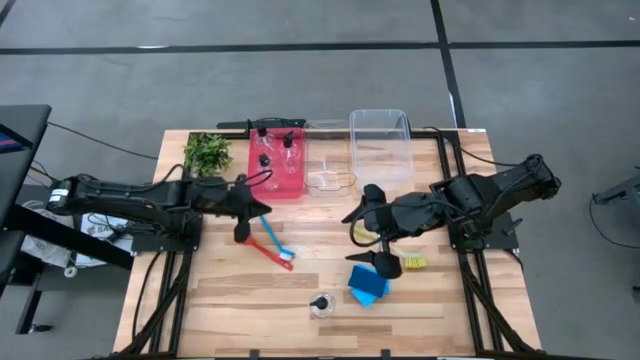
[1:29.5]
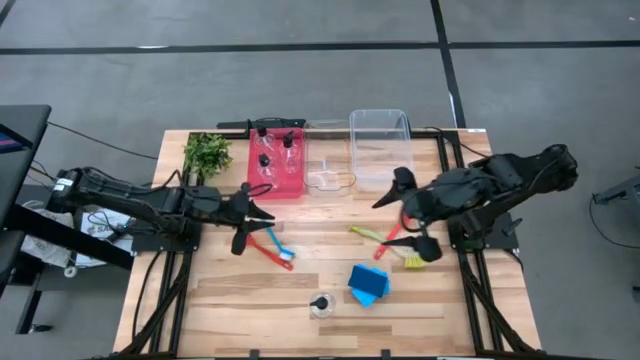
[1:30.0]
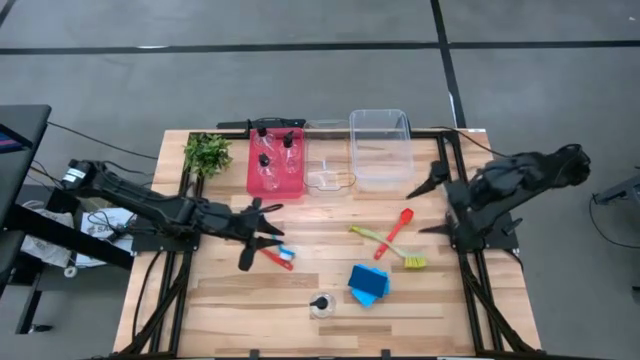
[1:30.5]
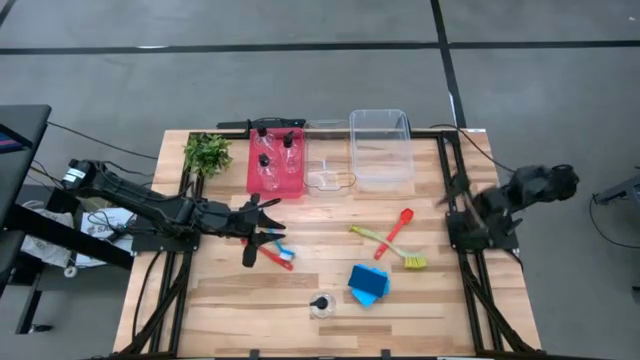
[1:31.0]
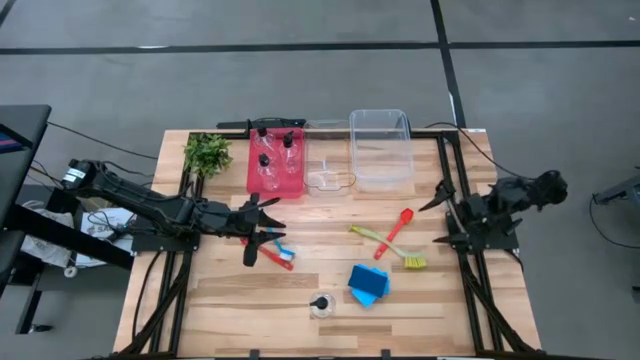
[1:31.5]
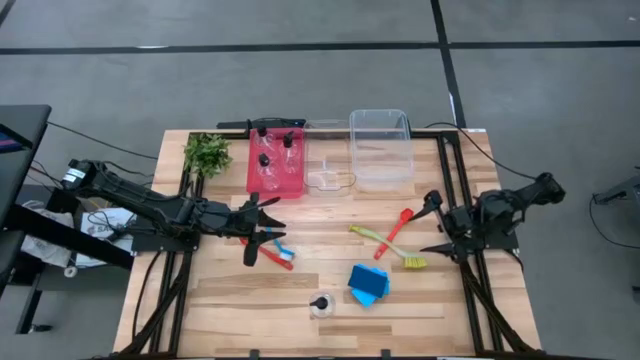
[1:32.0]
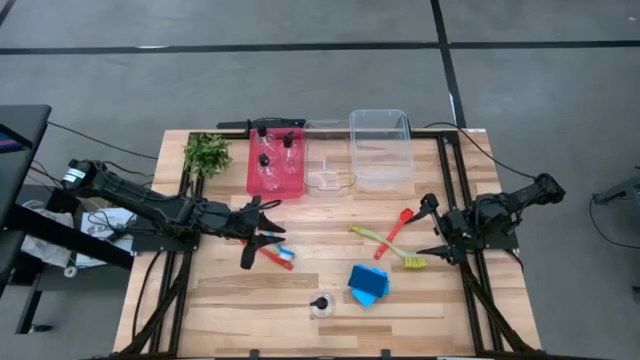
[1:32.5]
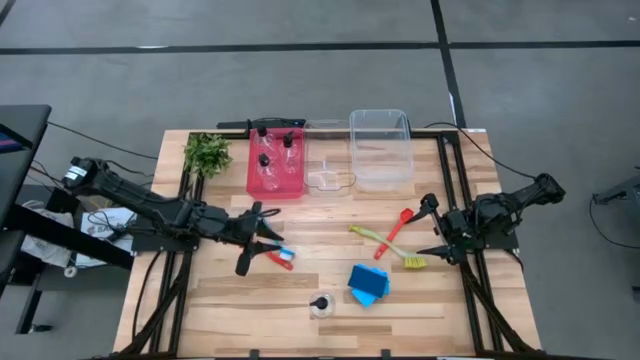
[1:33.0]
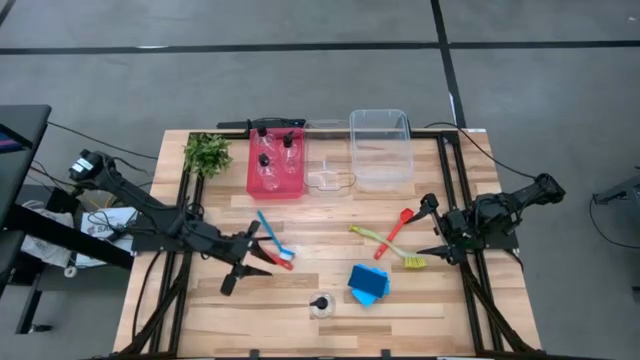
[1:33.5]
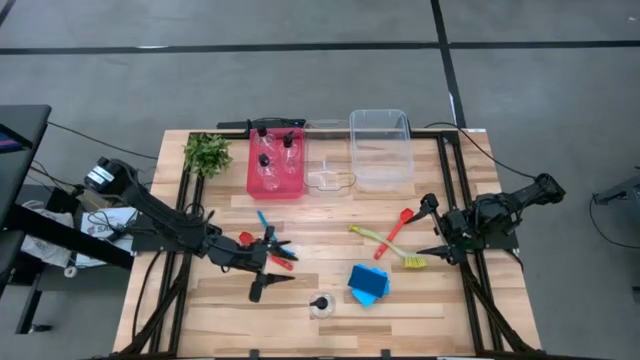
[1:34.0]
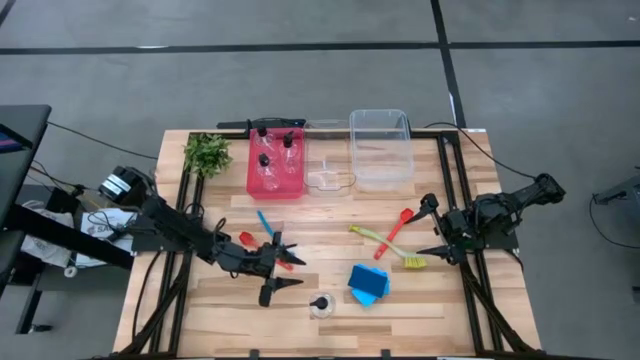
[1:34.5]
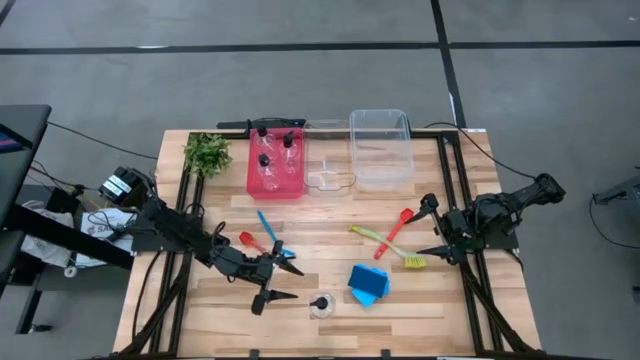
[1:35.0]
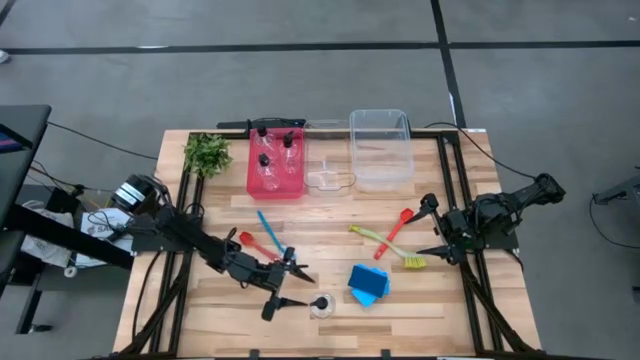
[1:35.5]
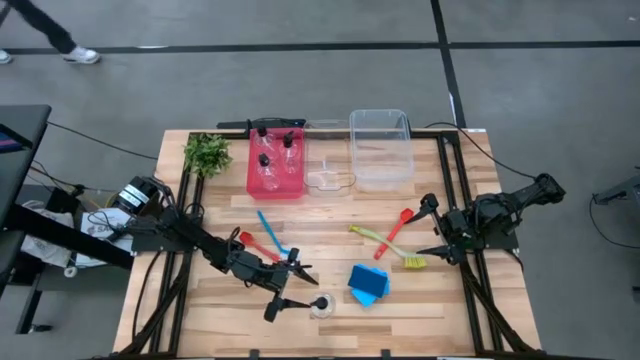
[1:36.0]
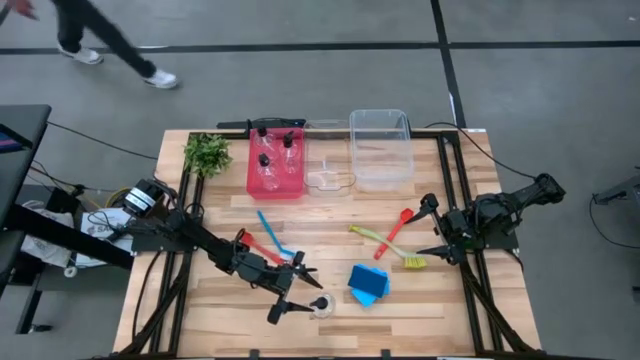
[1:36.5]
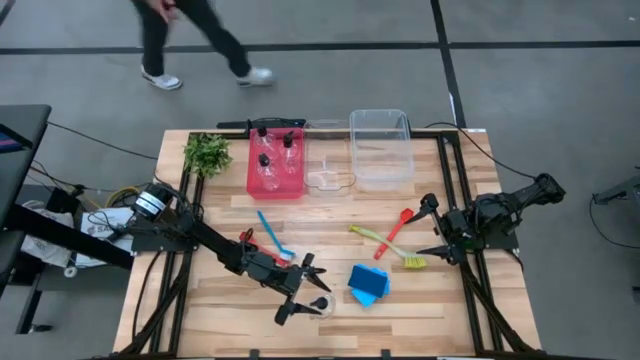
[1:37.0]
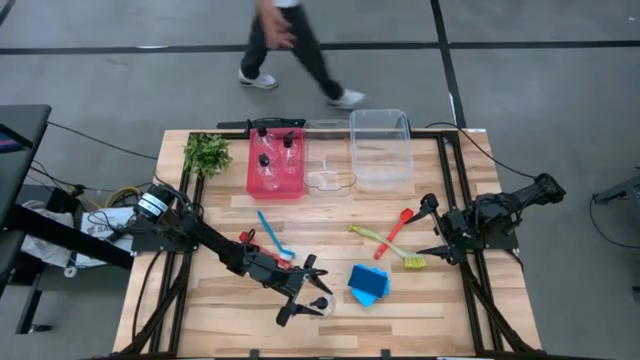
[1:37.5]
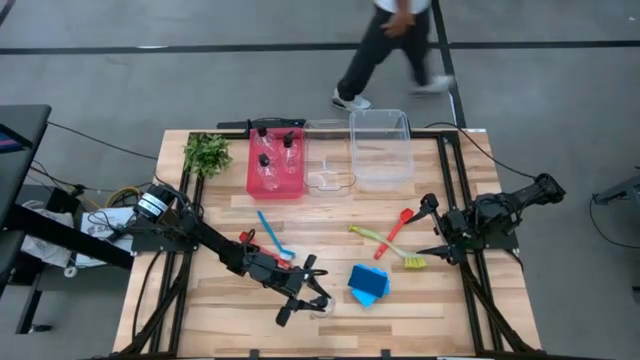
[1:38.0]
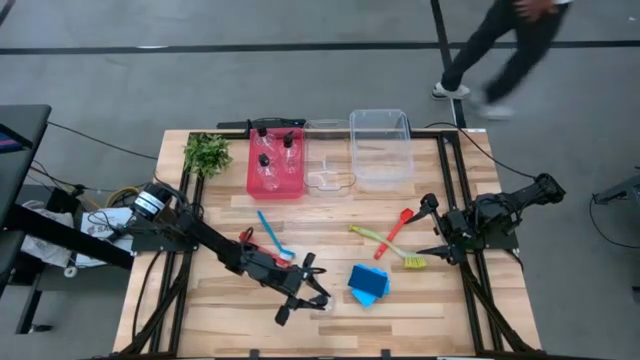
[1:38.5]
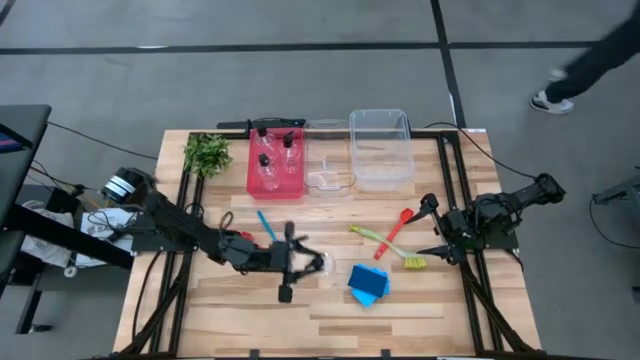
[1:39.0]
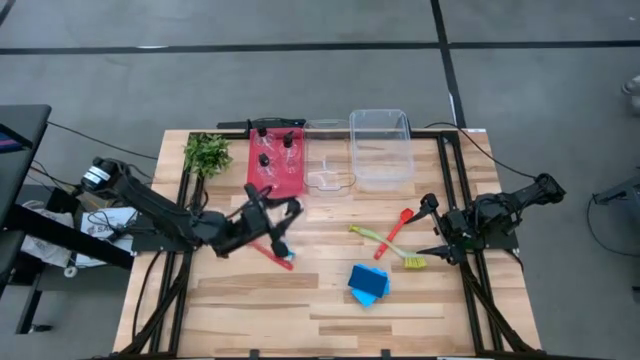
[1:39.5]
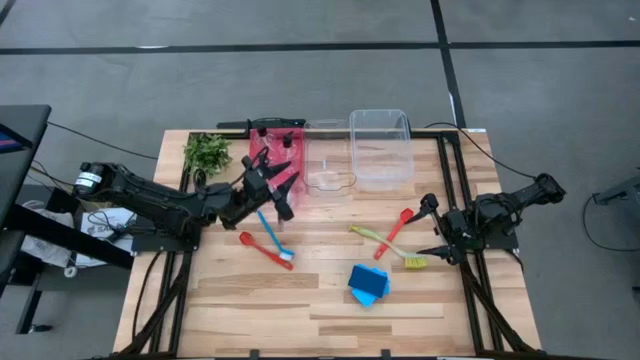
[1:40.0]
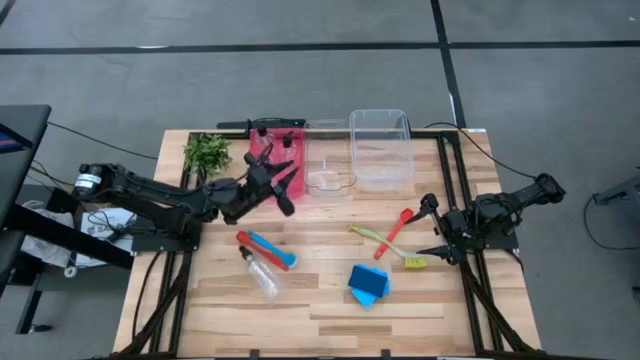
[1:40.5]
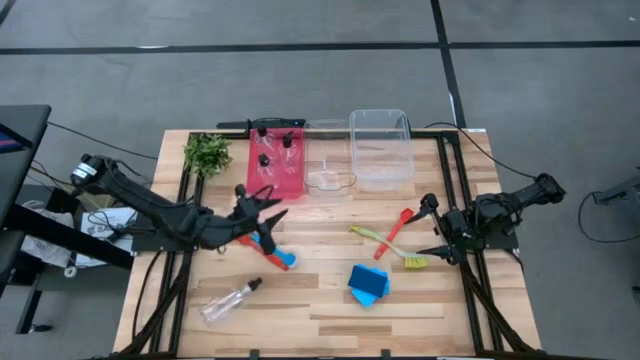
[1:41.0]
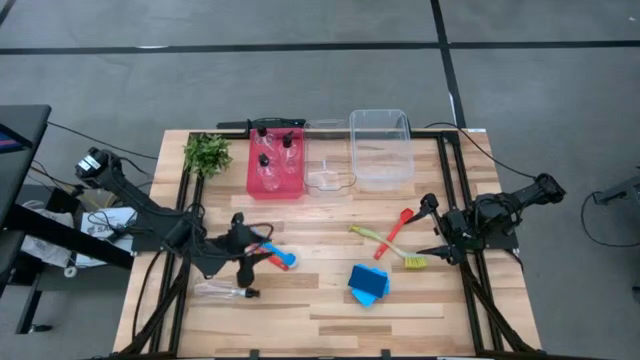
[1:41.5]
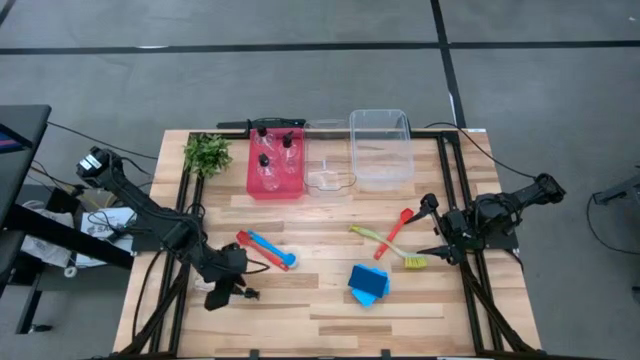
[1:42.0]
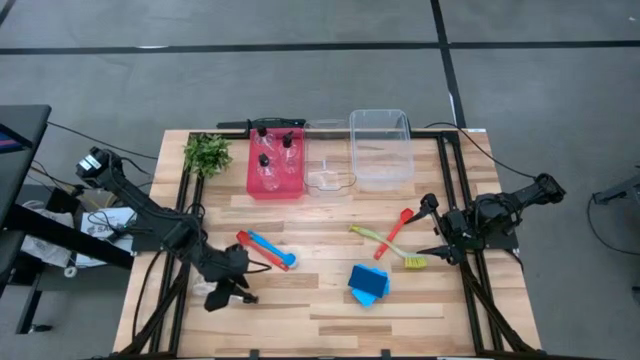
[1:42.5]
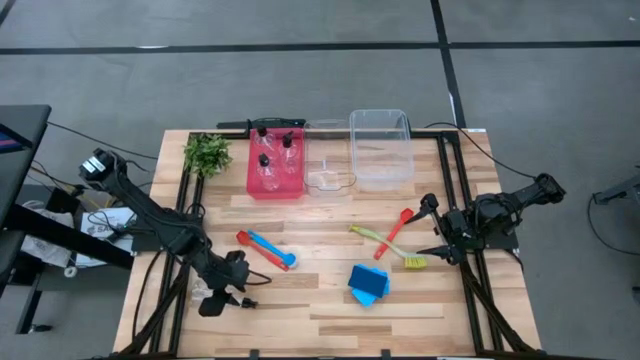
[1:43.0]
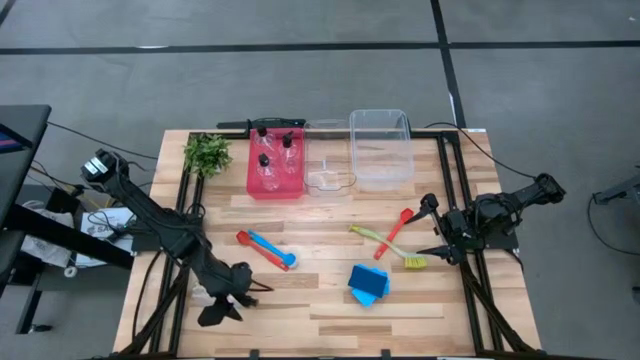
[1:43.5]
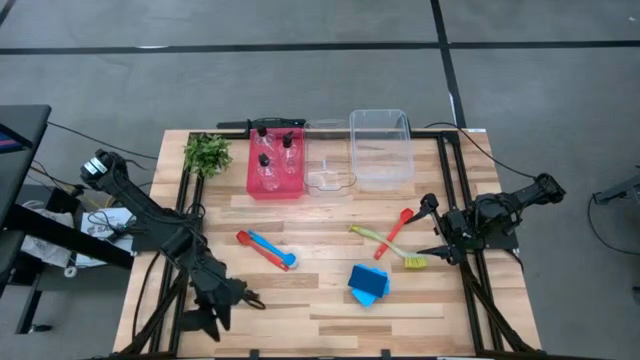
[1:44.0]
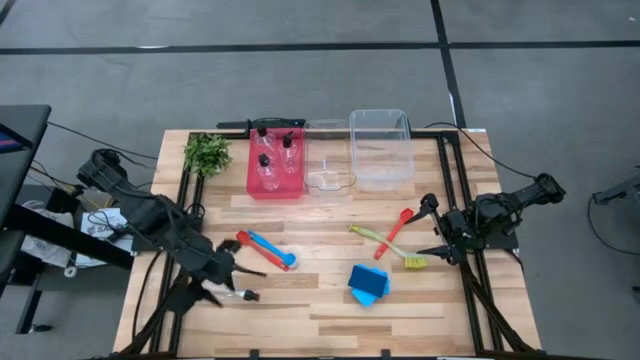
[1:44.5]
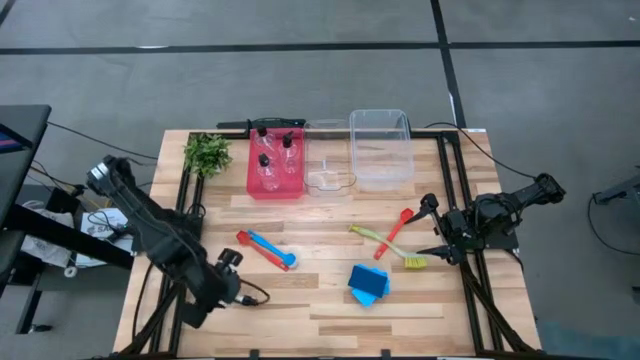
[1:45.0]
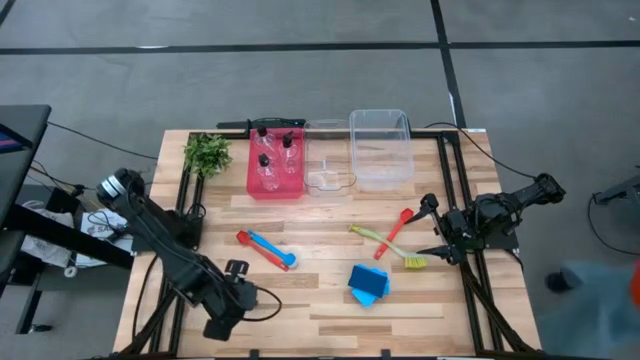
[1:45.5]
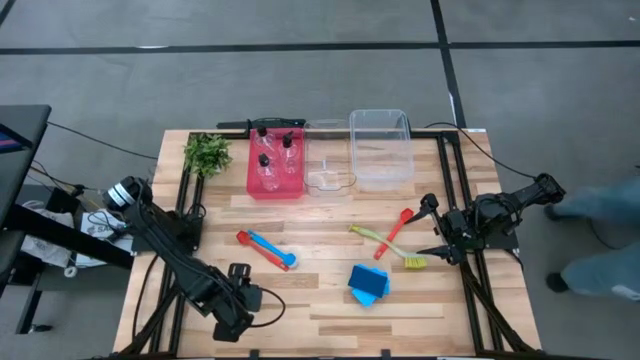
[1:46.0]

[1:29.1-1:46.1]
Task: Pick & Place Kitchen Sink Supplies
Put the spray bottle into the pink bin

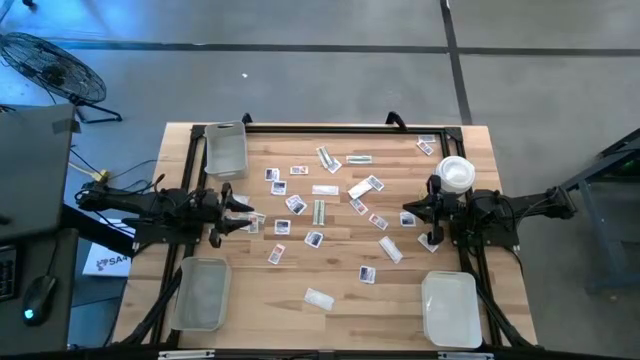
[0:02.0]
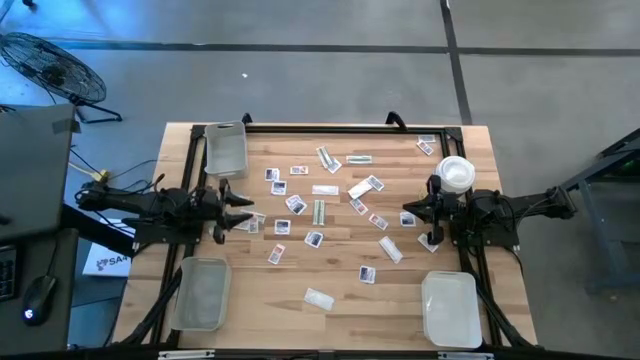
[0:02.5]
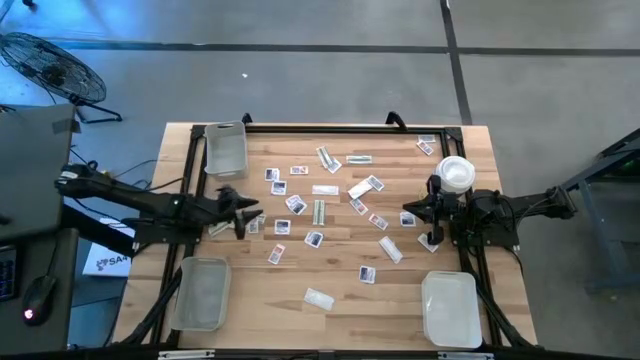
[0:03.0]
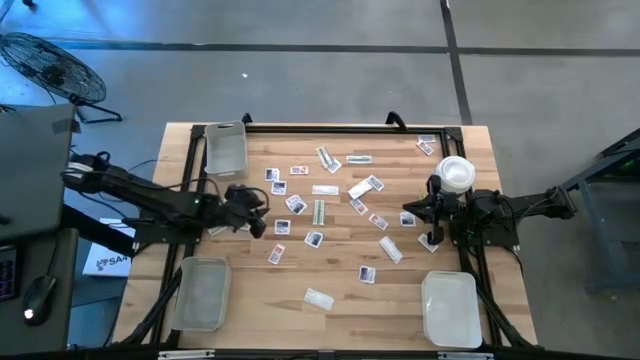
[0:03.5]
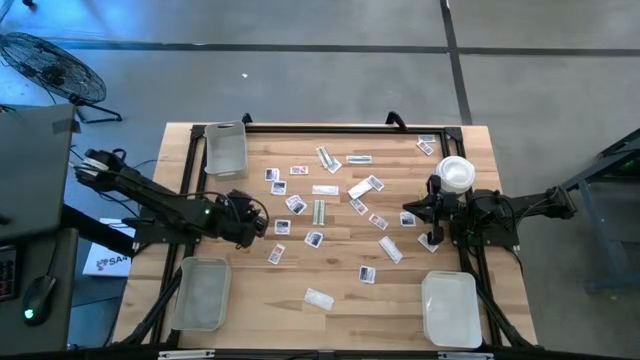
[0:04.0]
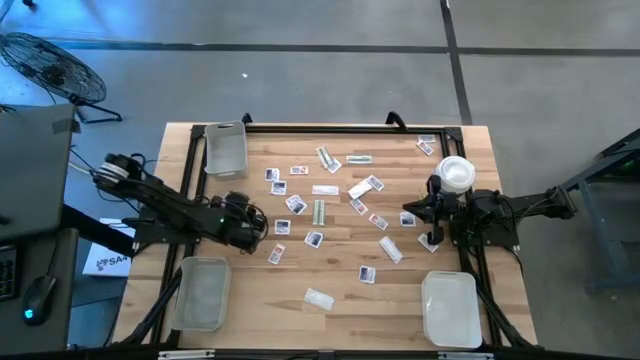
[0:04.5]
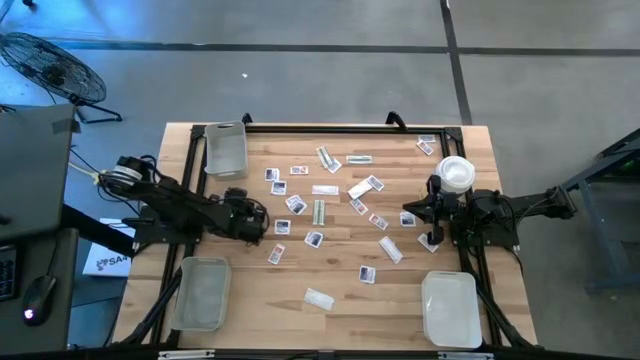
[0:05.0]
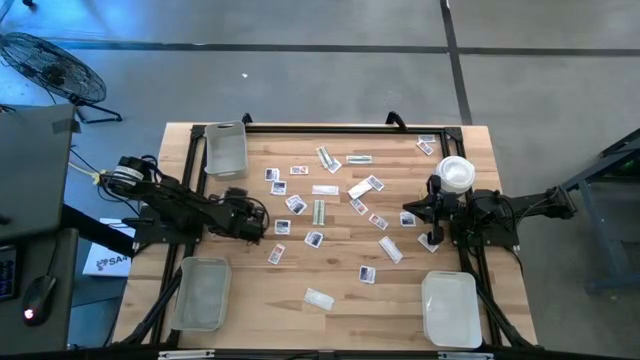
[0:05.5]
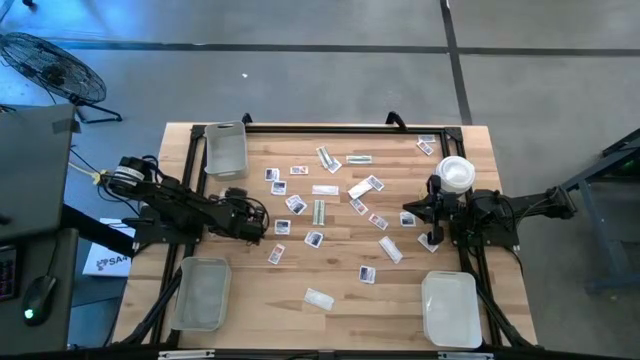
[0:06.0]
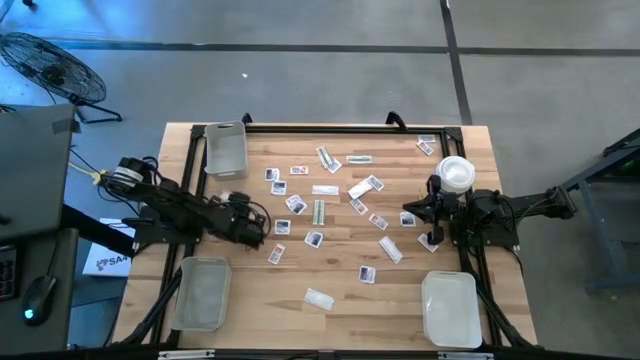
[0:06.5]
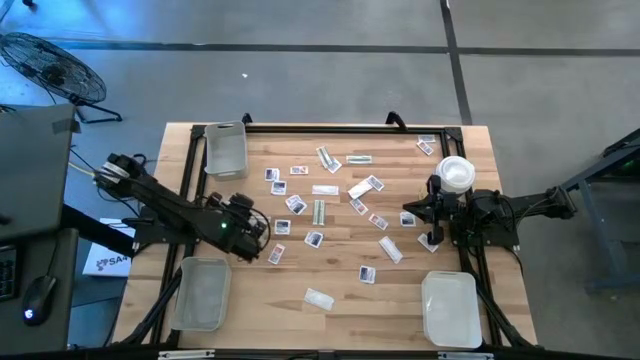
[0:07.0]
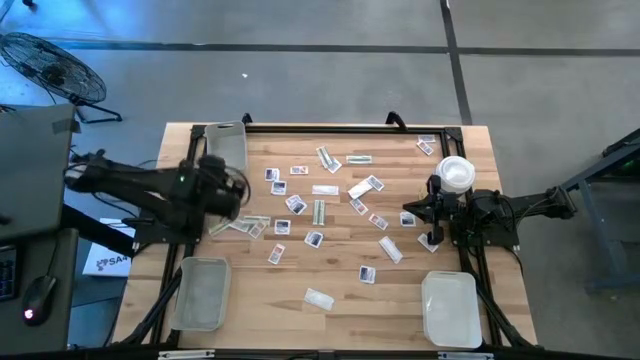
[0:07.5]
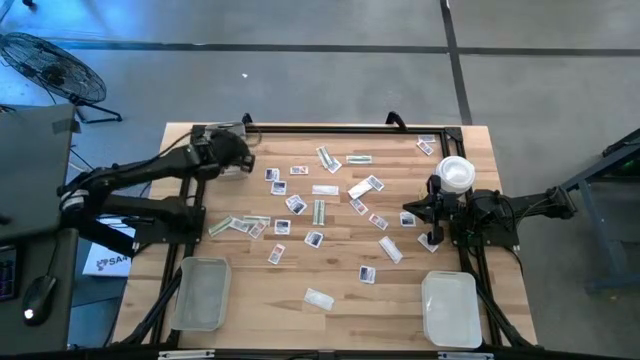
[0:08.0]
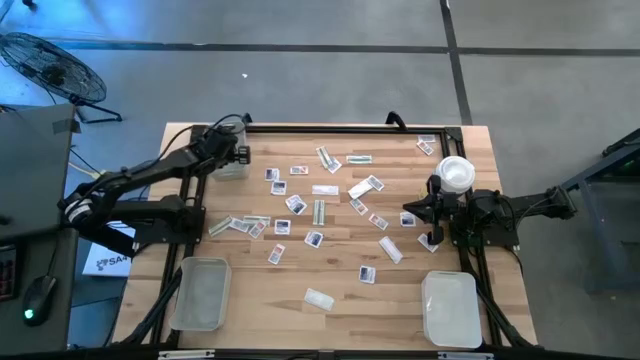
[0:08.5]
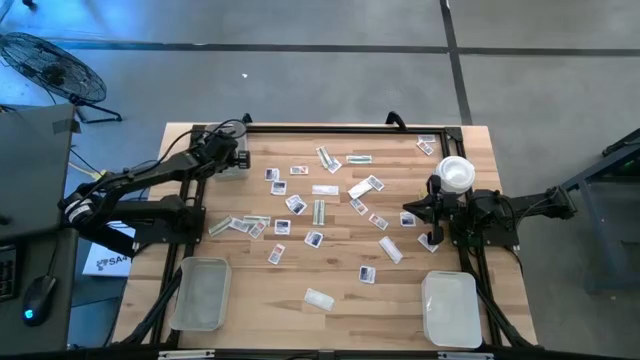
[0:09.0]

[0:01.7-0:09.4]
Task: Pick & Place First Aid Supplies
Put the green bandage pack into the top gray bin
